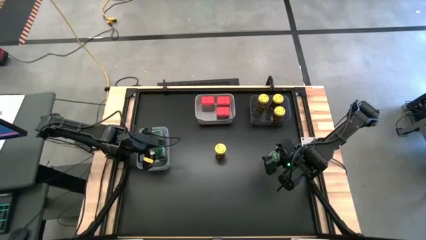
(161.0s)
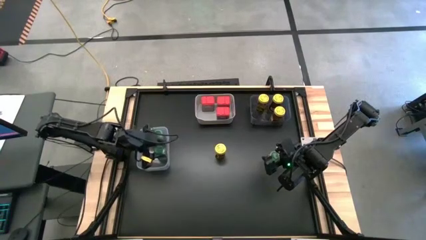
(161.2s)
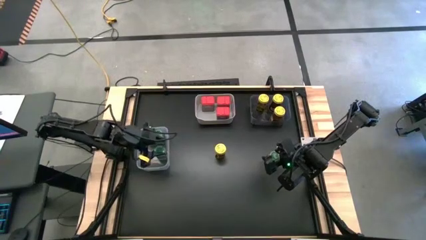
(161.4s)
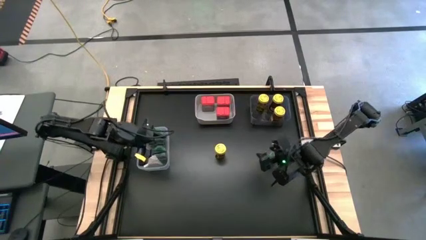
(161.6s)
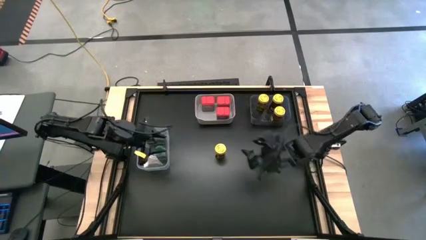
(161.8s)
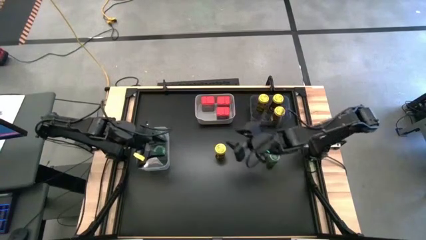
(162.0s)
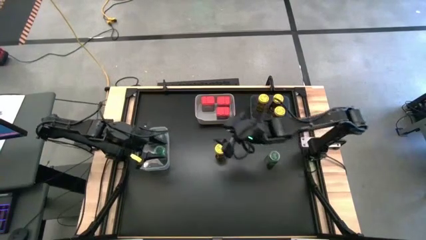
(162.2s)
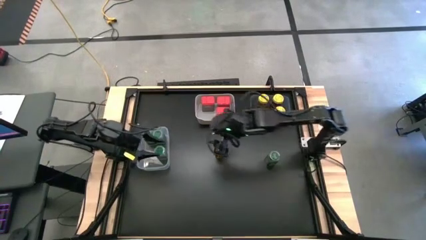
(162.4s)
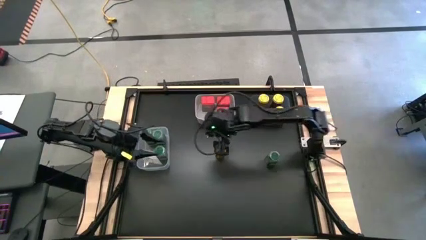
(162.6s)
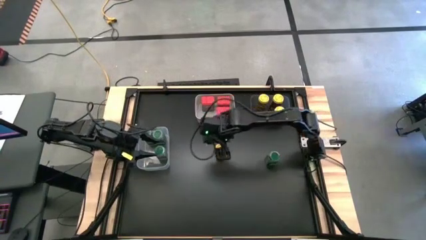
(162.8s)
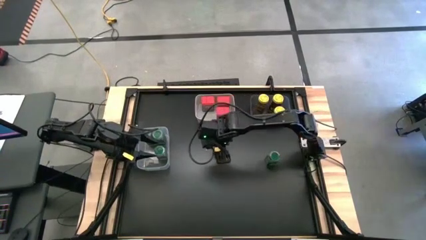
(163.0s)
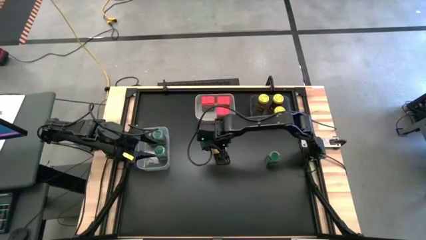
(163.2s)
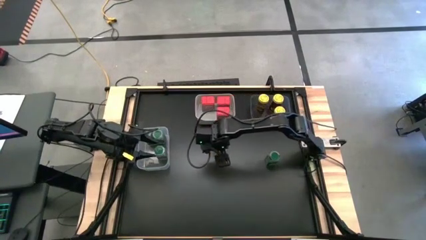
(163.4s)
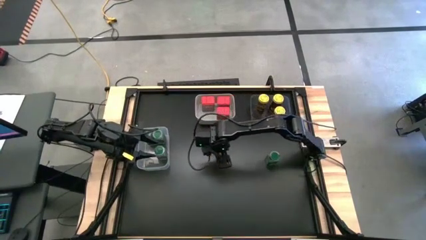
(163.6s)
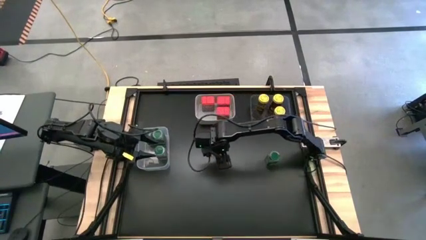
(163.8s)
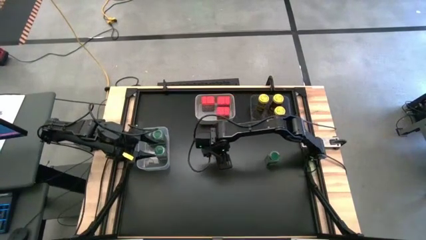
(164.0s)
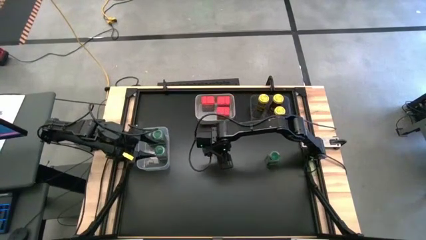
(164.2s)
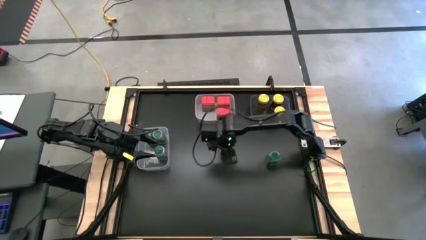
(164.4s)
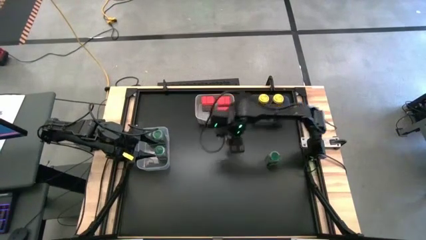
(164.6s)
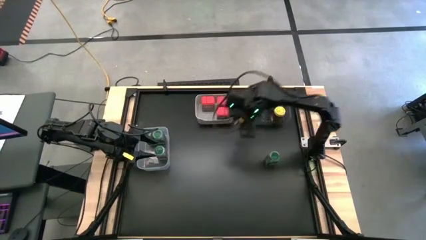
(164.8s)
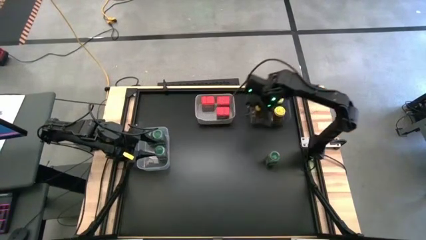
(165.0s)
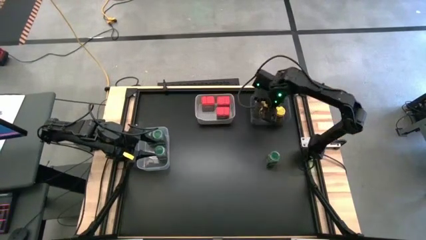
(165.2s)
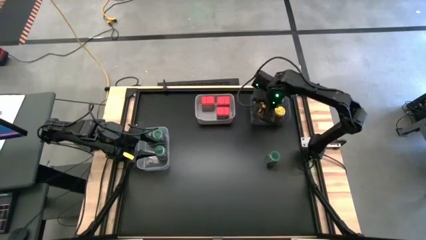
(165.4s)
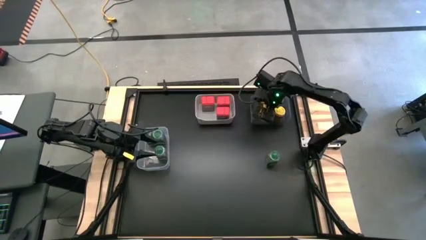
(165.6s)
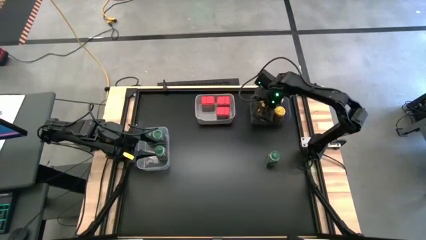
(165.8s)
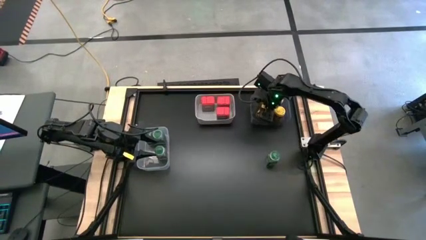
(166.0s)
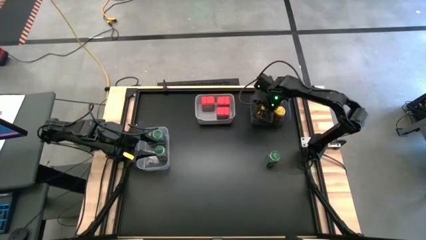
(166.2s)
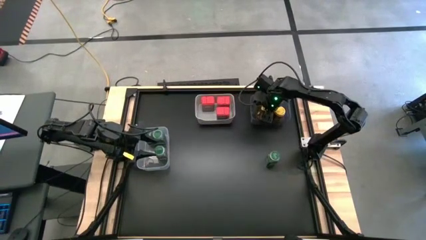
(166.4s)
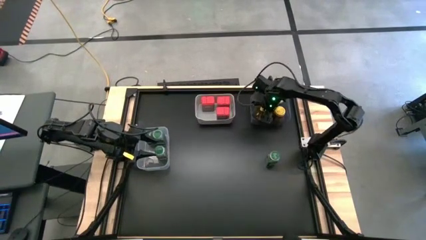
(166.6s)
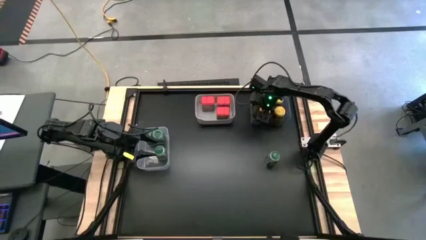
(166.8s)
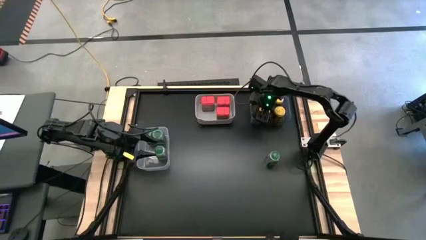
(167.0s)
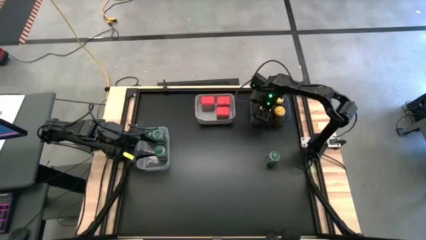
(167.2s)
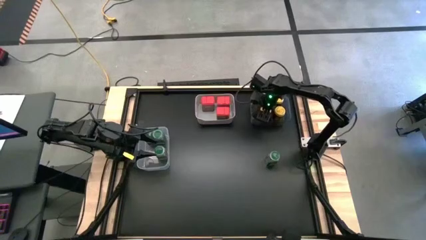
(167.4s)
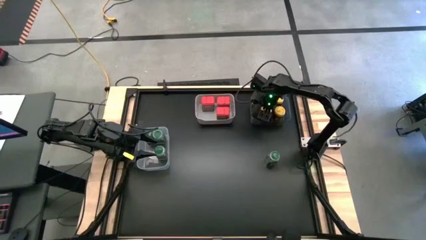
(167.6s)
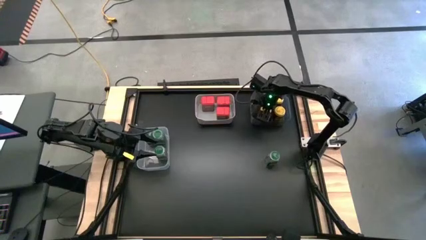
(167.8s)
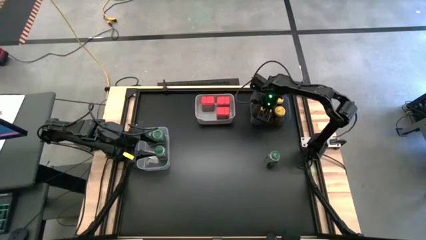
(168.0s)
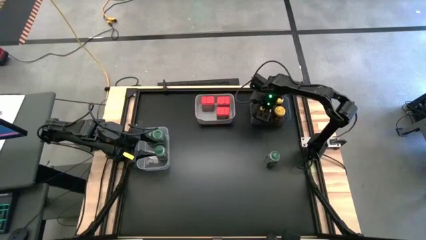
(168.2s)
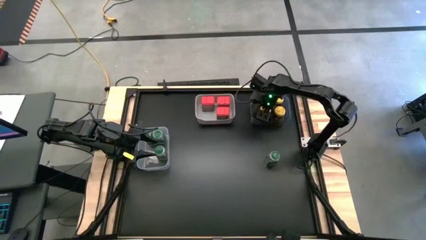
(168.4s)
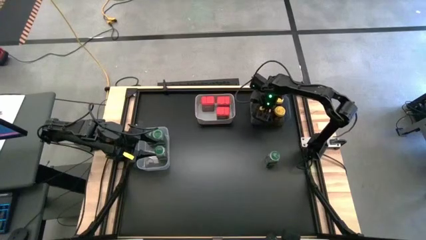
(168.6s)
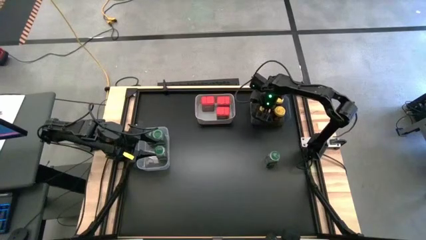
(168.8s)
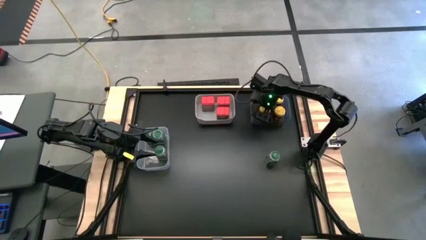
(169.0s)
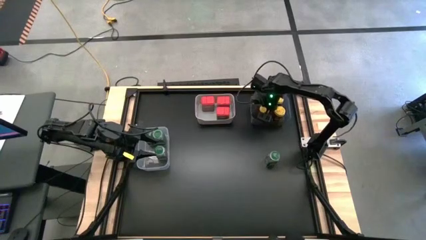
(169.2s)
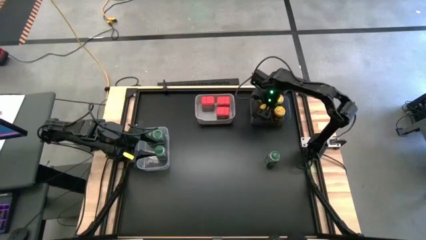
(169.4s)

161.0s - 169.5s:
Task: Sort spices by type
Put the yellow seasoning bottle into the black bin

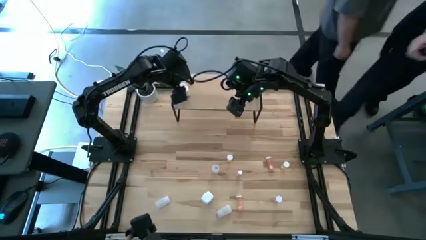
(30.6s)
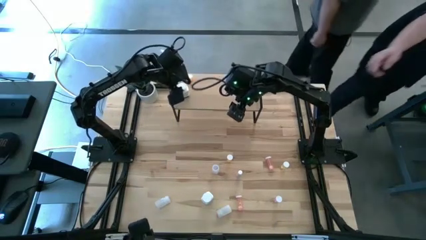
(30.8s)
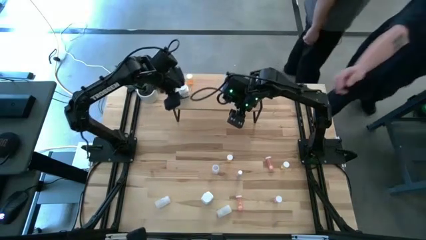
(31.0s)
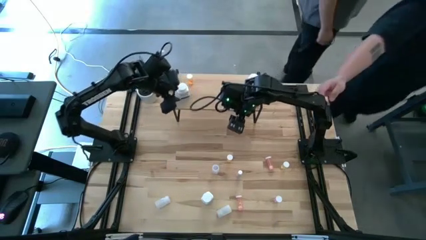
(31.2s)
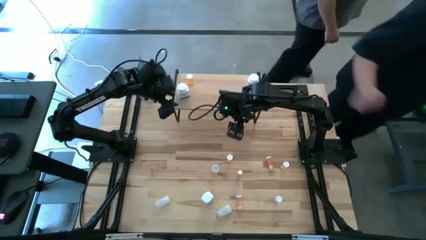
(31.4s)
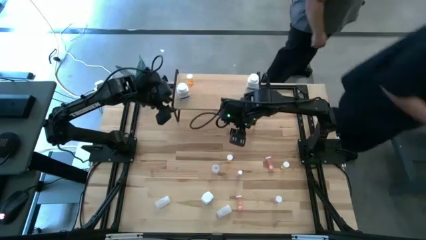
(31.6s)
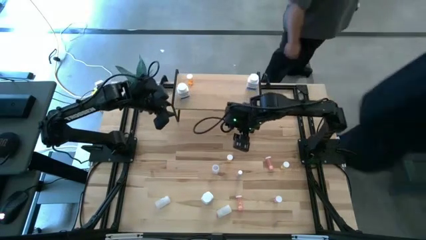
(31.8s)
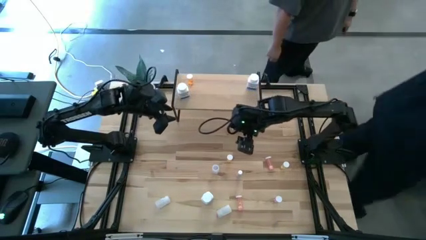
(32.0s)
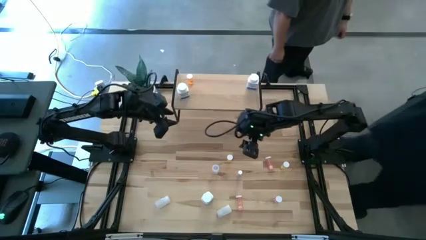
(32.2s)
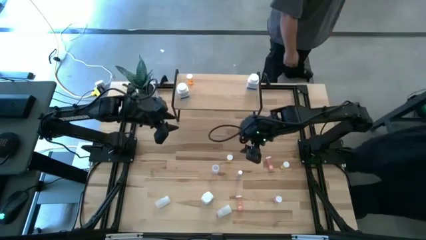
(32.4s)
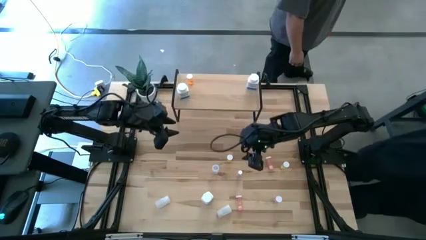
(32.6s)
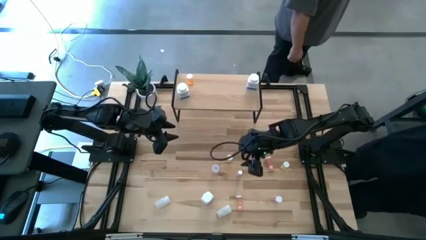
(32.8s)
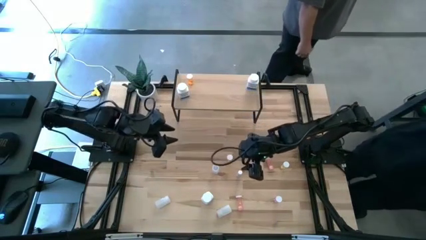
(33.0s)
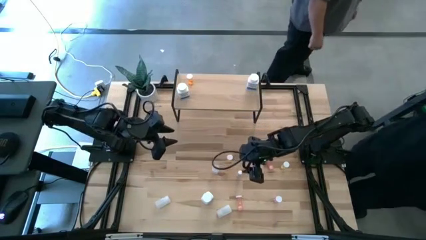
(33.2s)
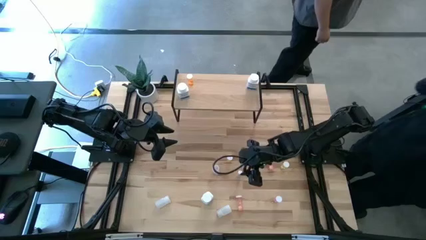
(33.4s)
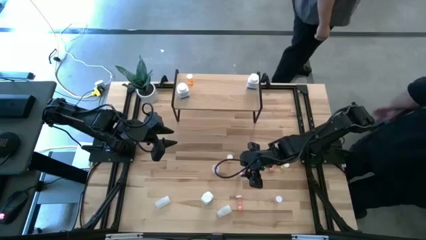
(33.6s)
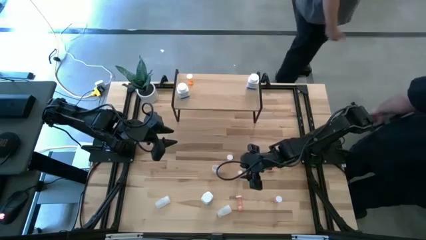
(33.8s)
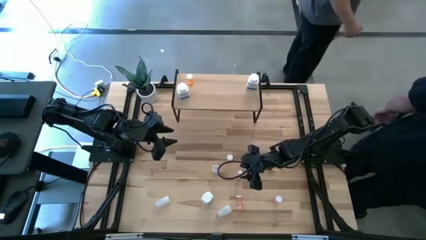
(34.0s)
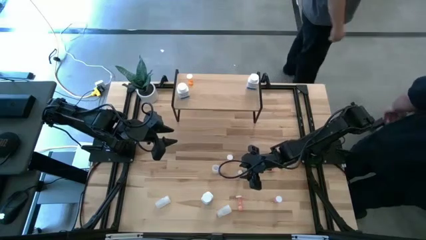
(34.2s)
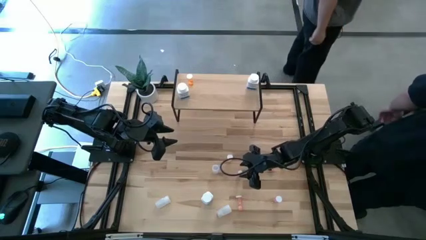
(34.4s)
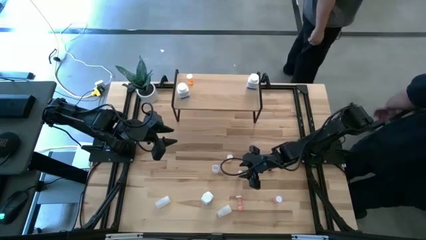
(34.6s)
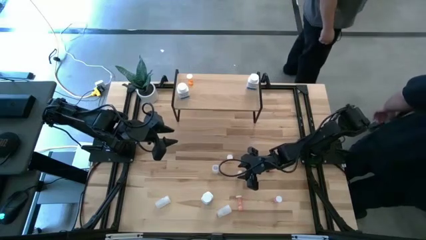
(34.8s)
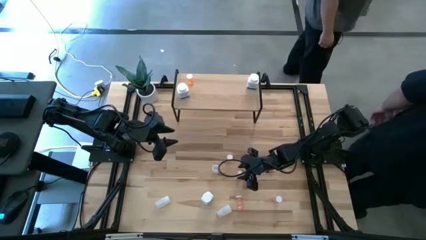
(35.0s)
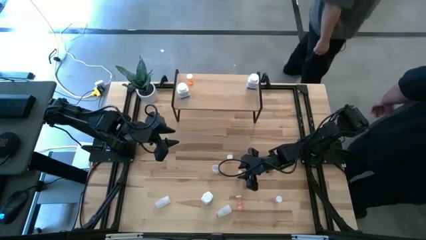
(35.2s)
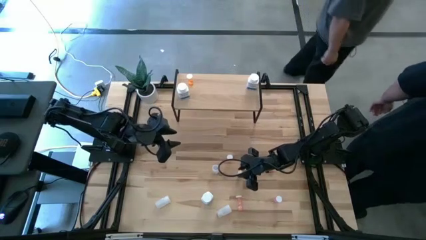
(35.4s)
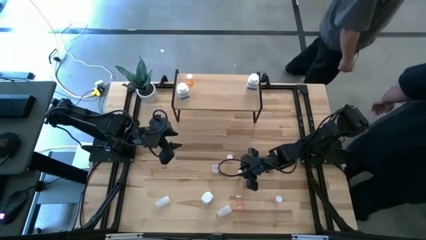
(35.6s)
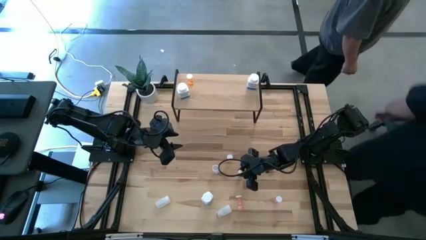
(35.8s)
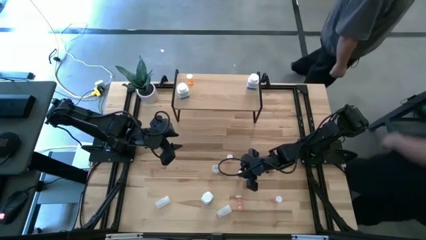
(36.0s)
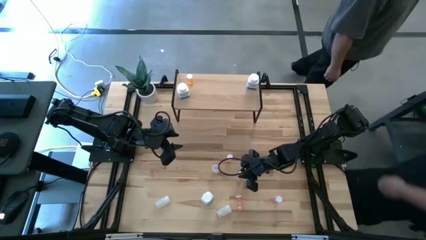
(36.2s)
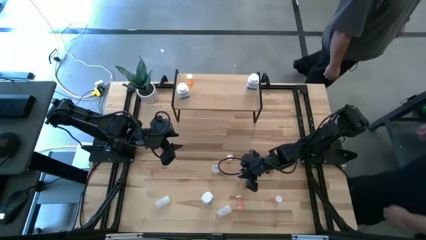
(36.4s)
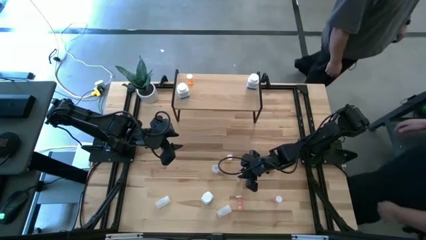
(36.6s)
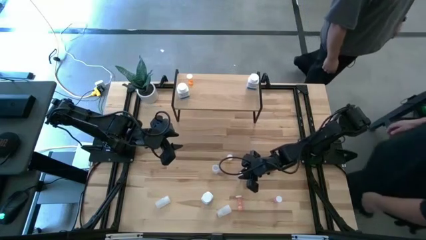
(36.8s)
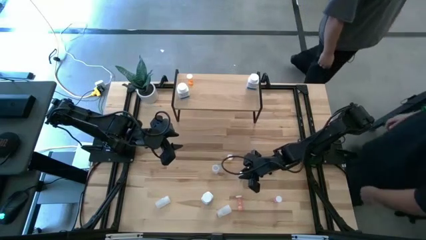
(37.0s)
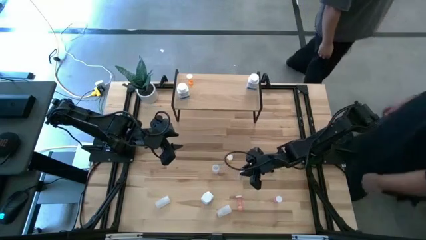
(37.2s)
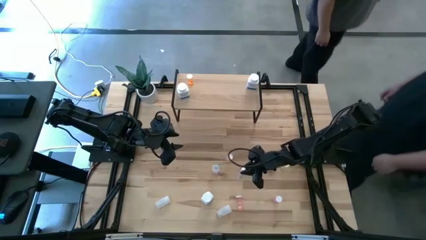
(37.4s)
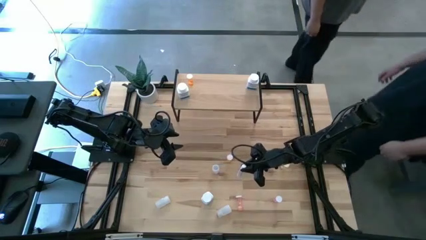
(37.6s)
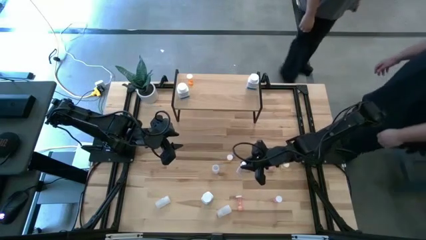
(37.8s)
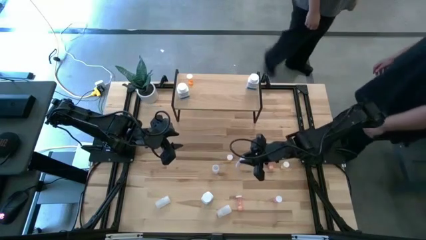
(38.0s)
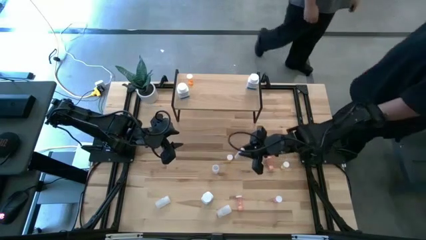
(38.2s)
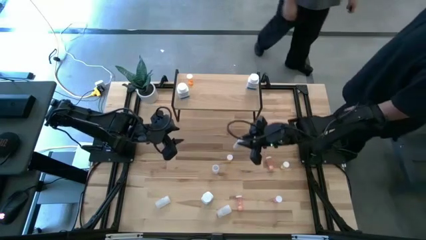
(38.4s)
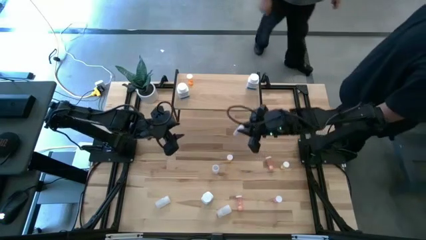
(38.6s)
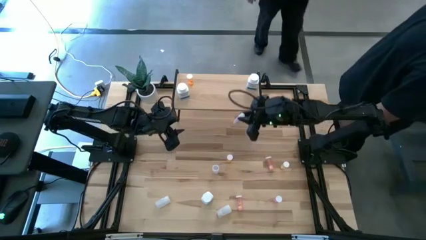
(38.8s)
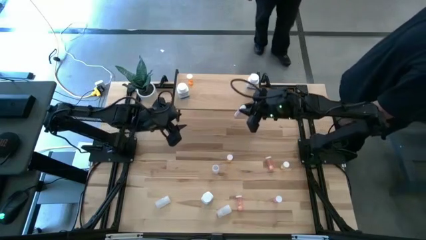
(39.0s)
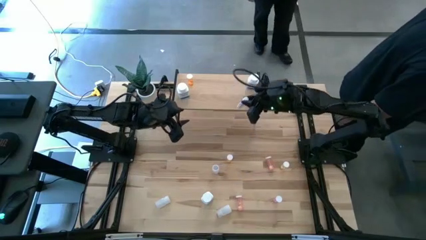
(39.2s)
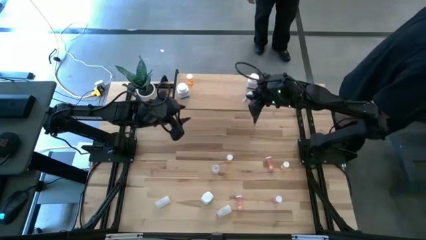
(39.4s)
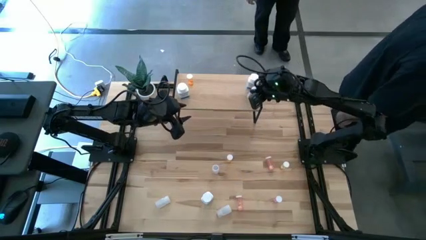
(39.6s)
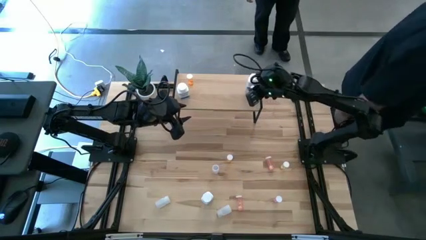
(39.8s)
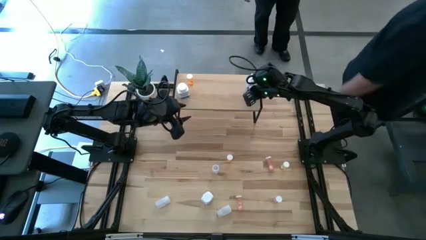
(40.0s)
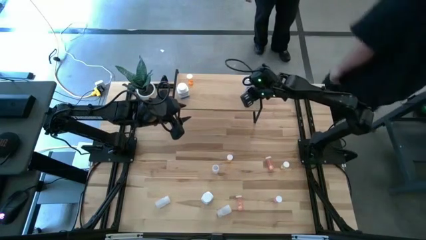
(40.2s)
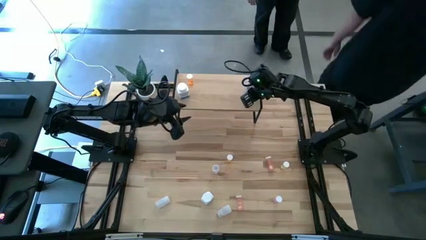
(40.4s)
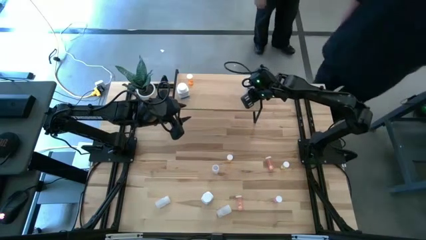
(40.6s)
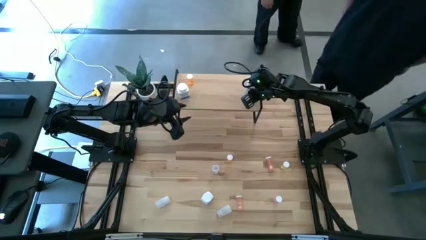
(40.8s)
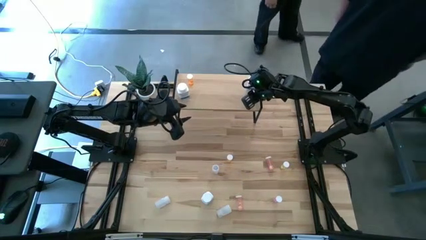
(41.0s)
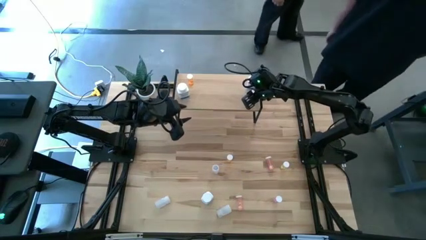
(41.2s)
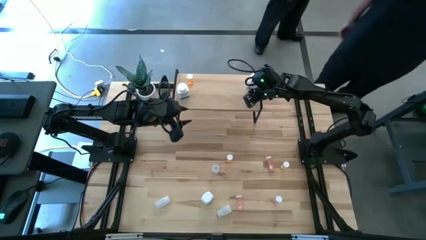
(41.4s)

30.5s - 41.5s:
Task: Pick and place medicine bottles onto shelf by color
Put the right white pill bottle on the shelf
